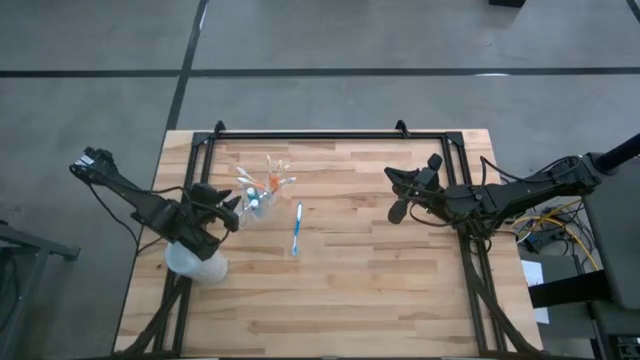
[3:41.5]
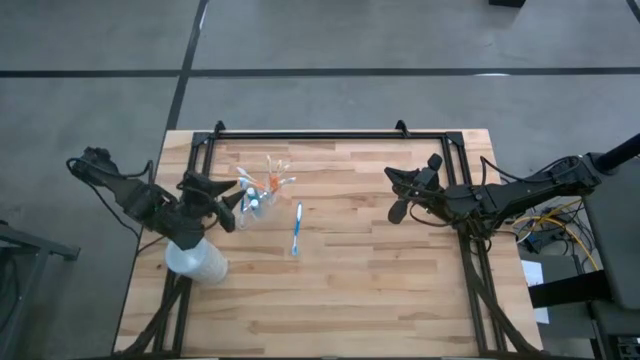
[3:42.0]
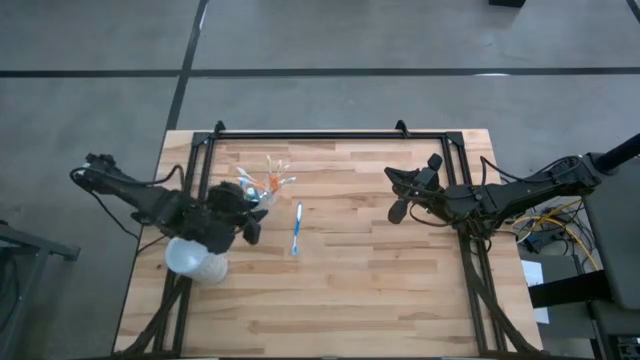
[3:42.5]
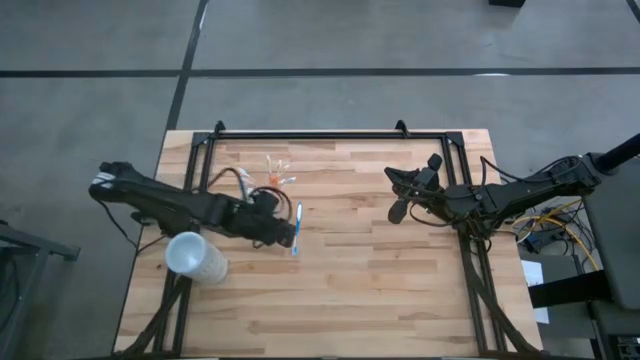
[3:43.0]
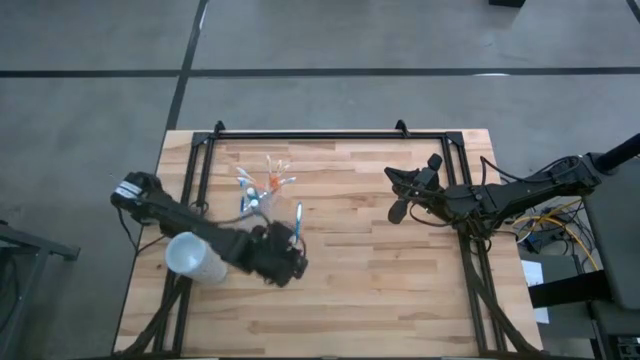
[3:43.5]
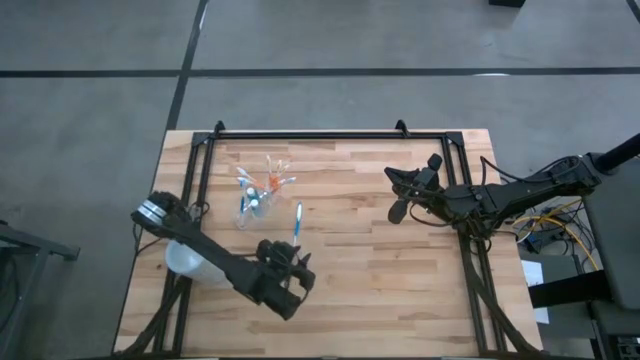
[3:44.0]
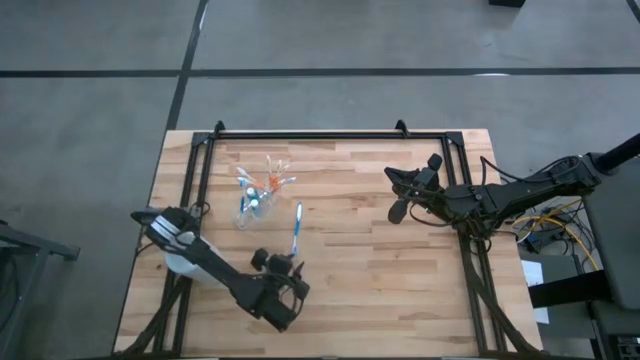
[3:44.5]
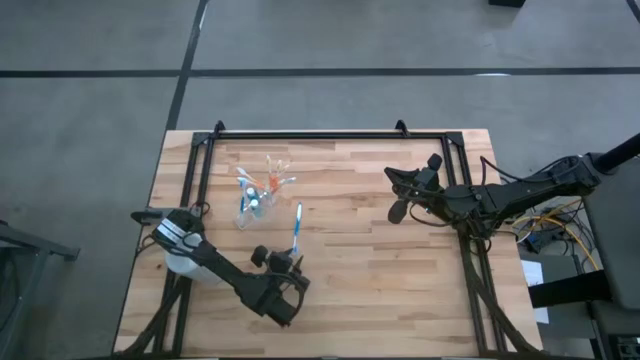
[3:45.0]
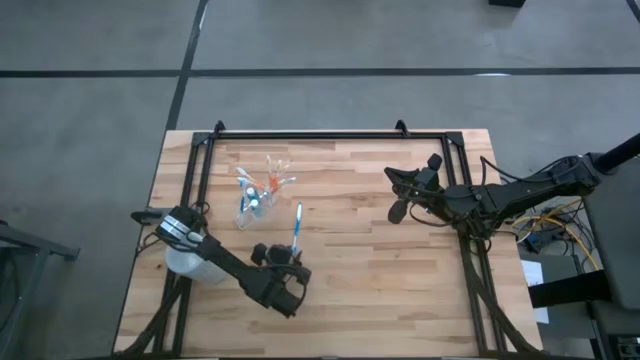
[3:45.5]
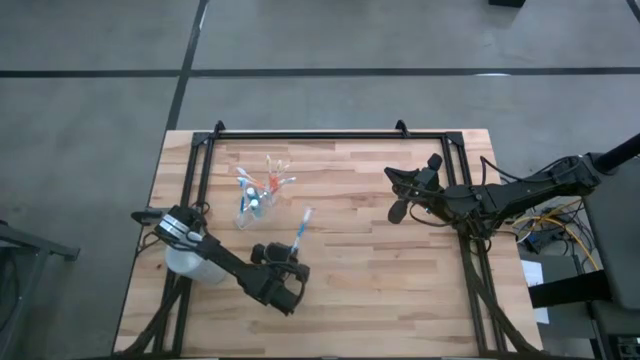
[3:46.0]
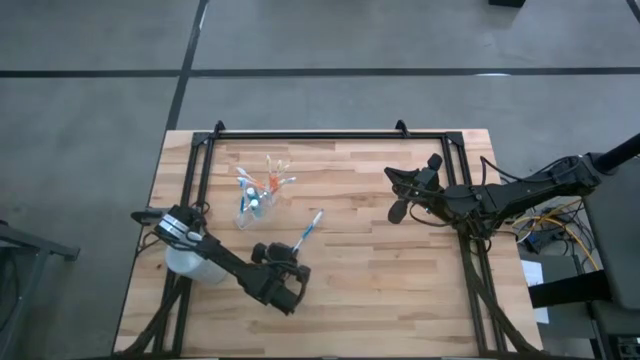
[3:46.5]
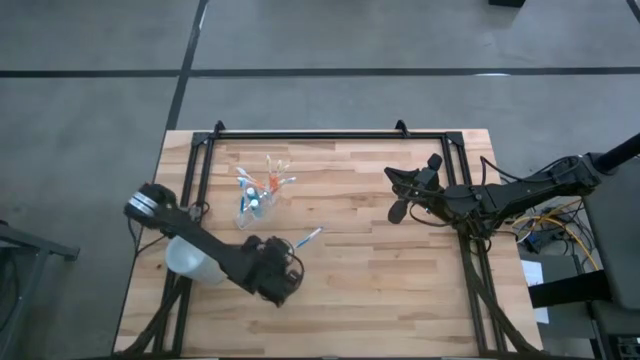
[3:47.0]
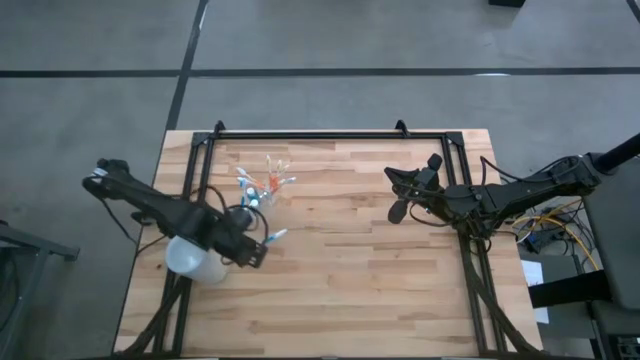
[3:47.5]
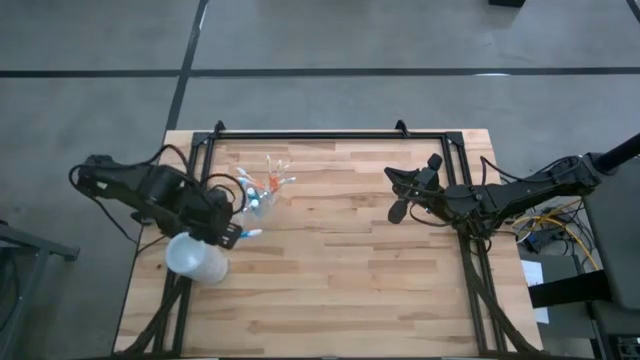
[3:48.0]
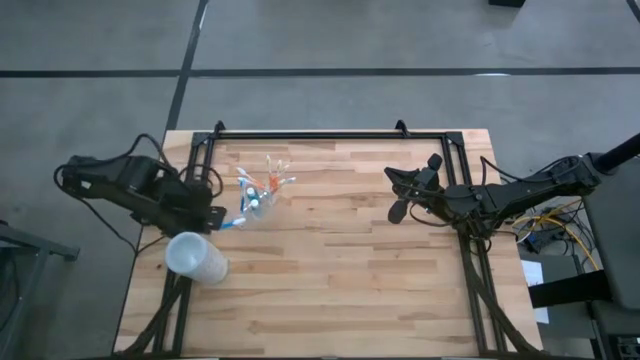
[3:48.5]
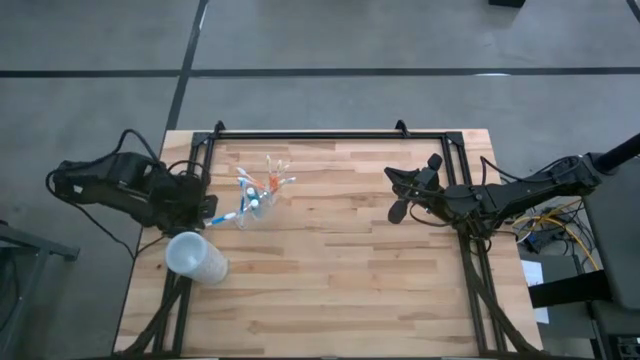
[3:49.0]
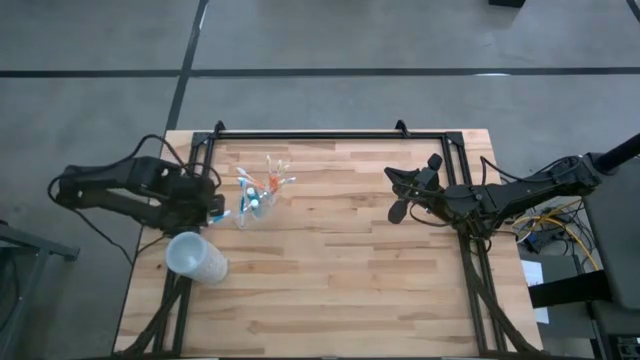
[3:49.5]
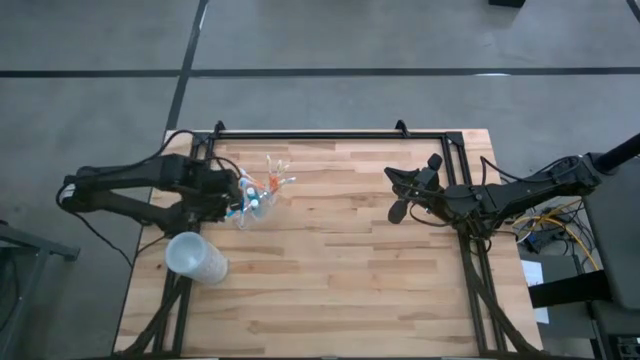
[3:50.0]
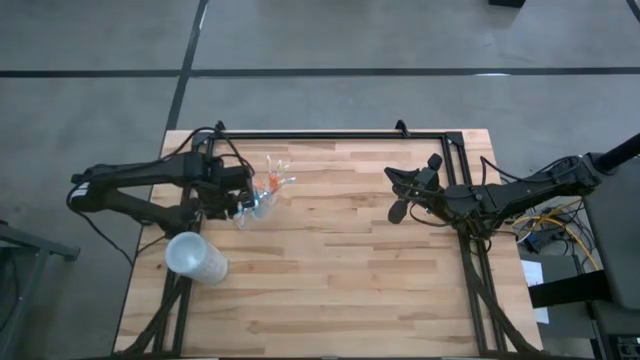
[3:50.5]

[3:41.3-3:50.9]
Task: Pick & Place toothbrushing station
Put the blue toothbrush into the transparent organizer

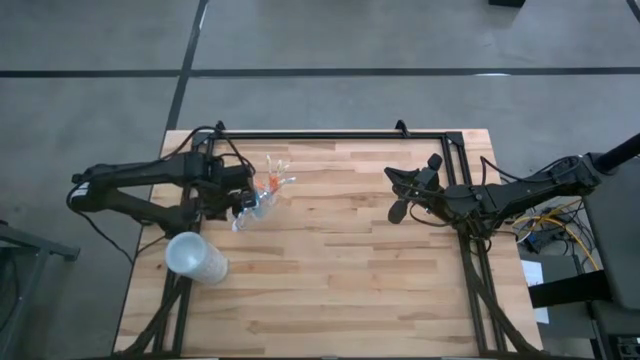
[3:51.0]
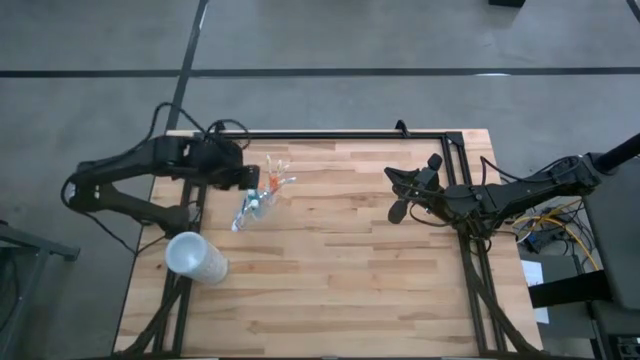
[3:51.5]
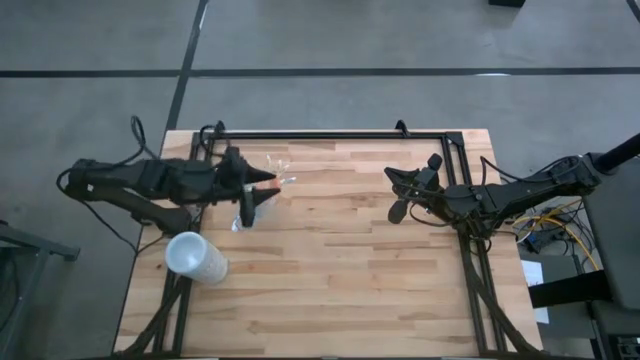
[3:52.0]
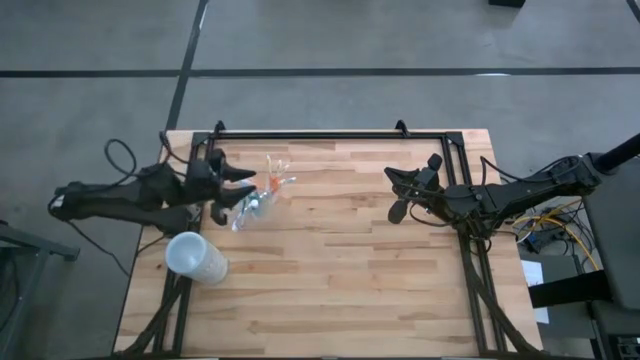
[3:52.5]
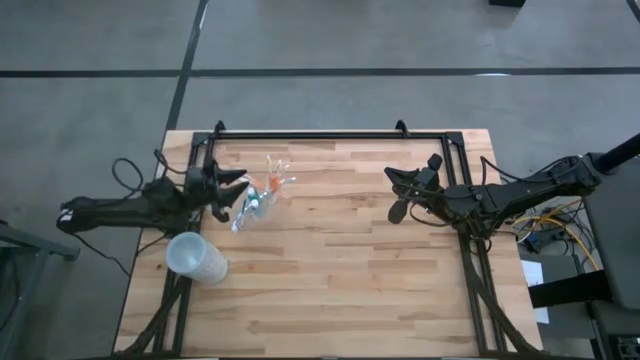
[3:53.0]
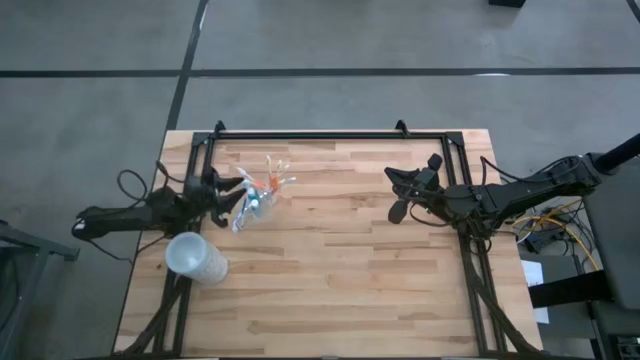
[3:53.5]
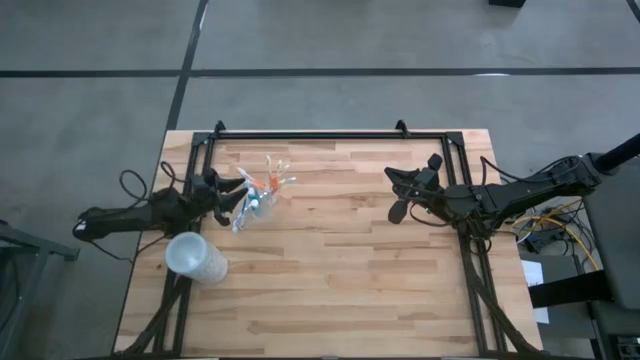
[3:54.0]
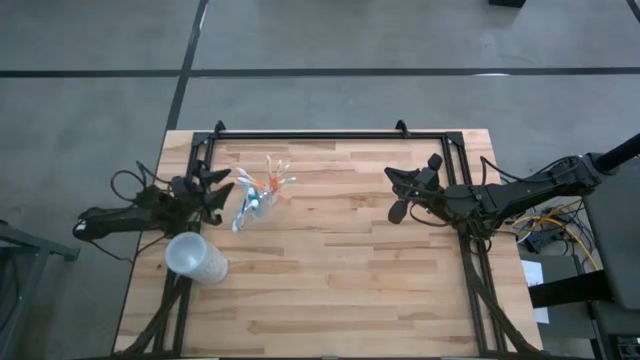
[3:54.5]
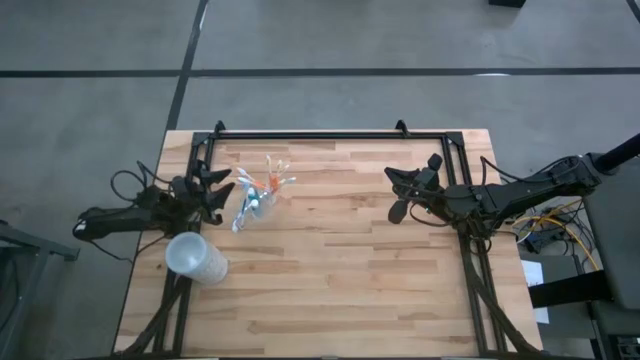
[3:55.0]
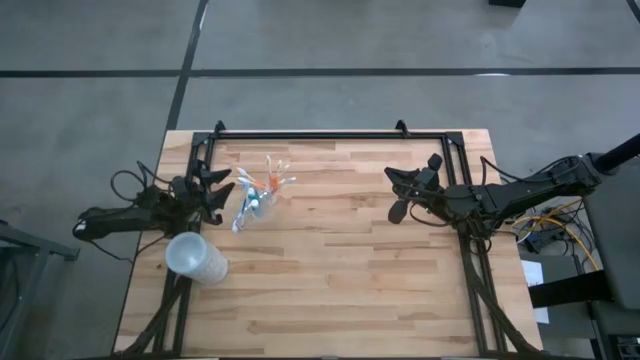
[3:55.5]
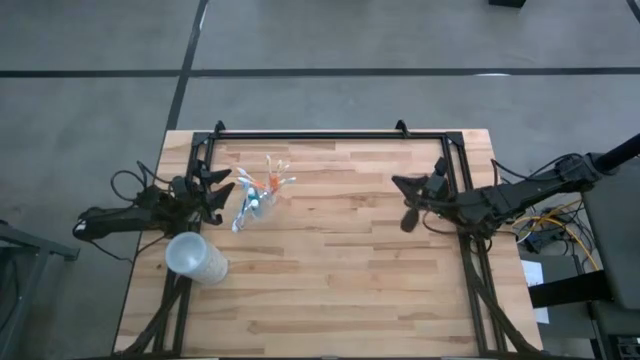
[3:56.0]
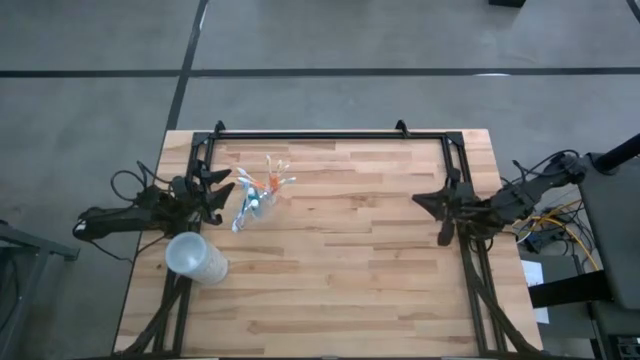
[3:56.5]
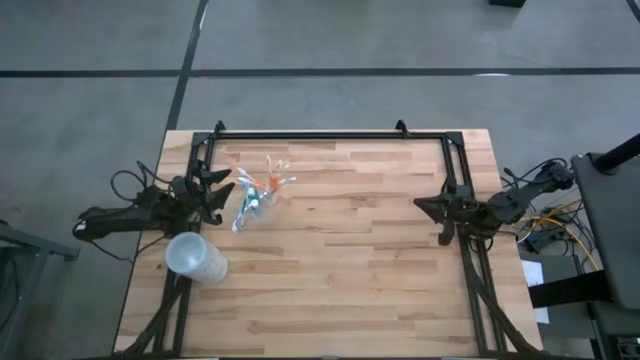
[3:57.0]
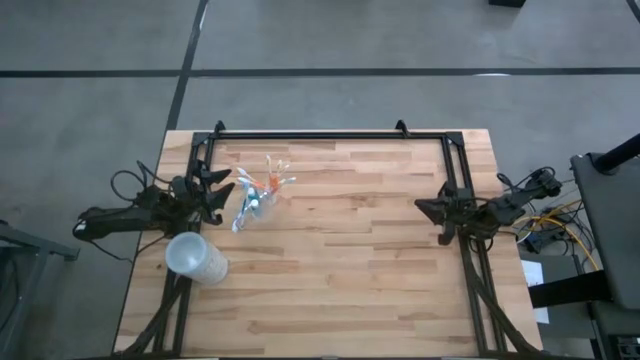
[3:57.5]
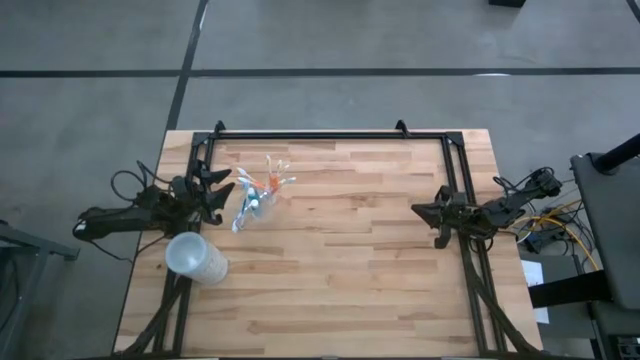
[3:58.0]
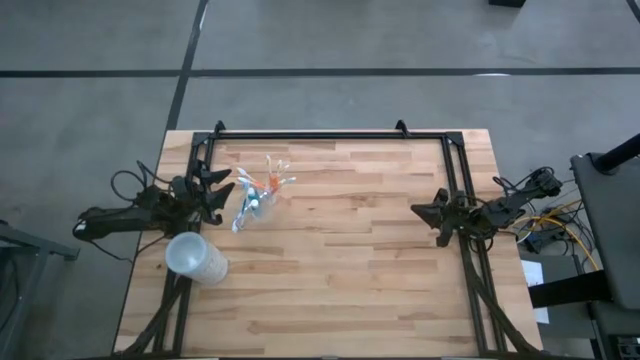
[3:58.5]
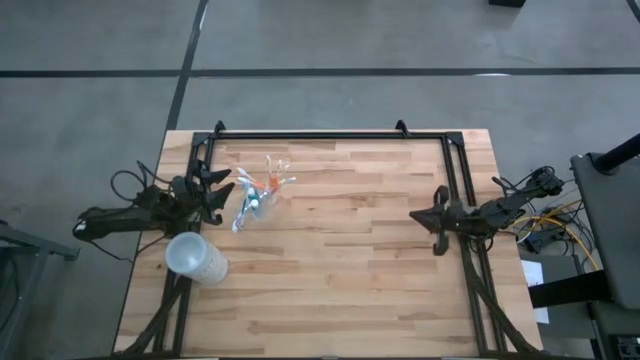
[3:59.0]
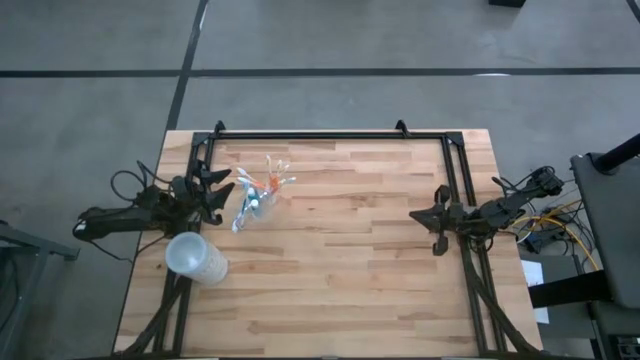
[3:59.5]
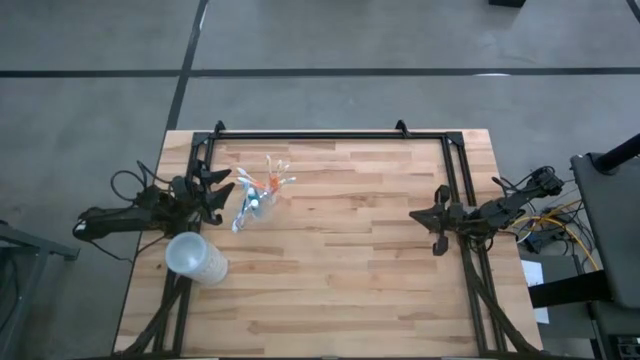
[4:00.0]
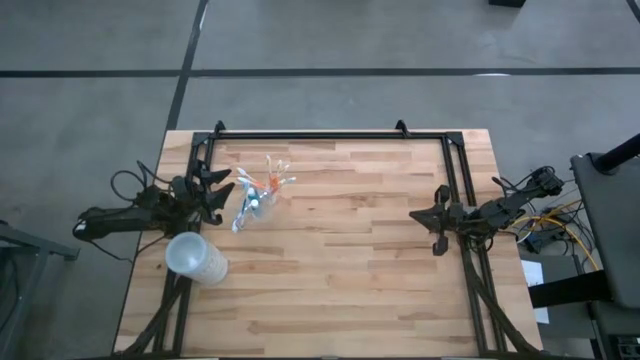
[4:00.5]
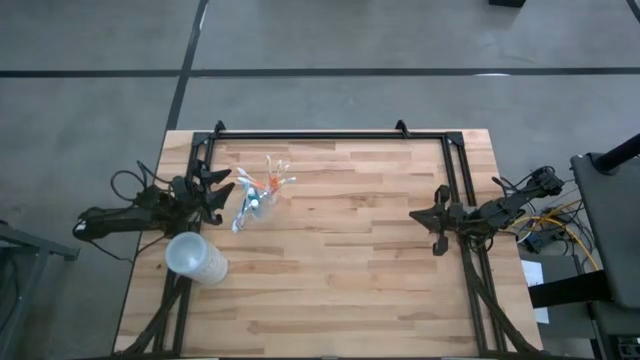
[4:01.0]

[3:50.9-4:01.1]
Return to Home Position

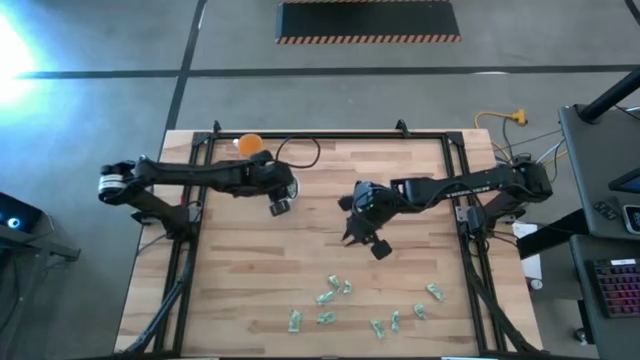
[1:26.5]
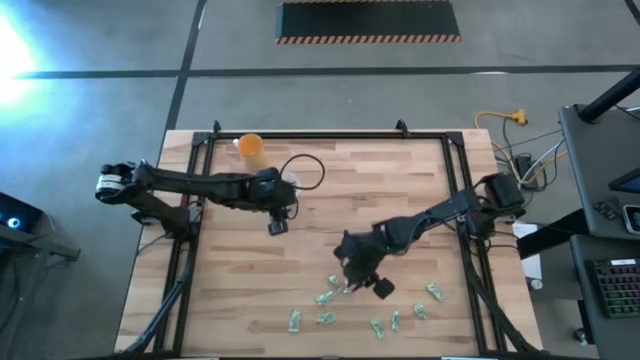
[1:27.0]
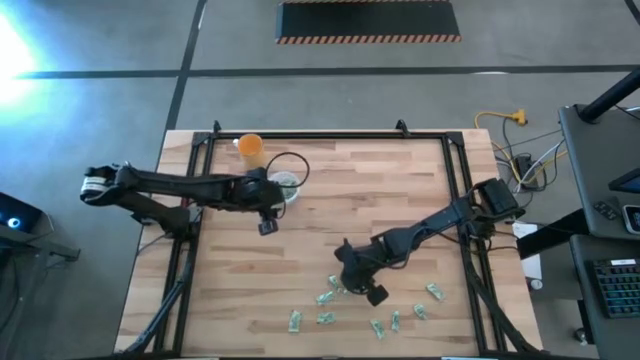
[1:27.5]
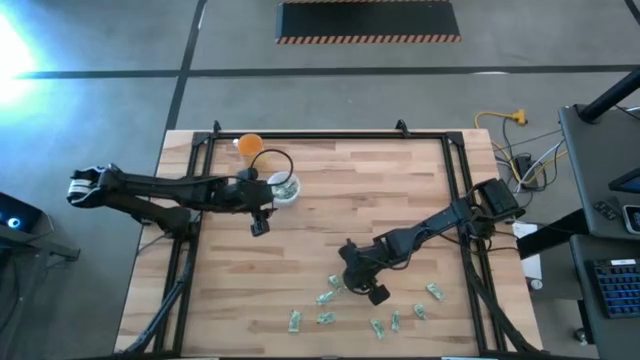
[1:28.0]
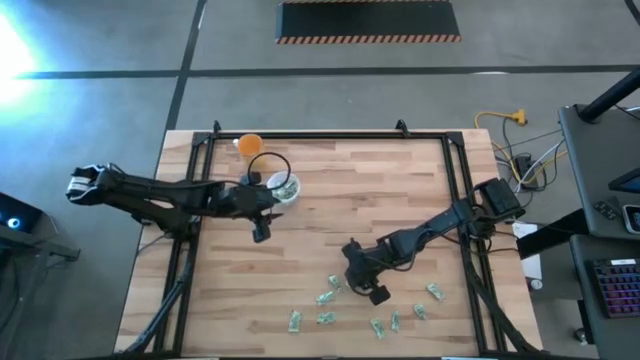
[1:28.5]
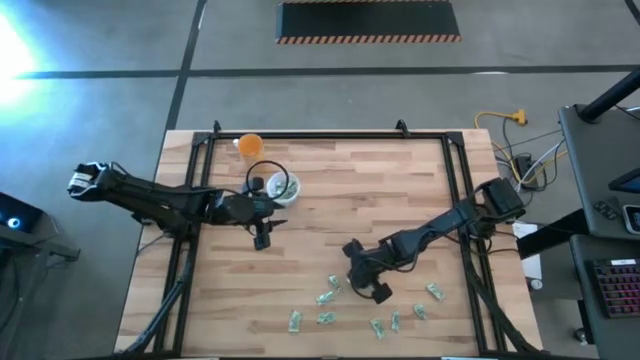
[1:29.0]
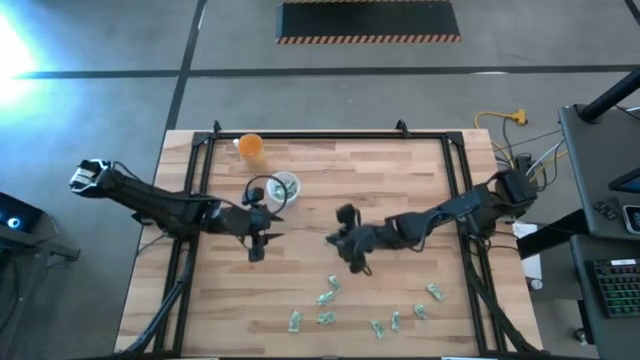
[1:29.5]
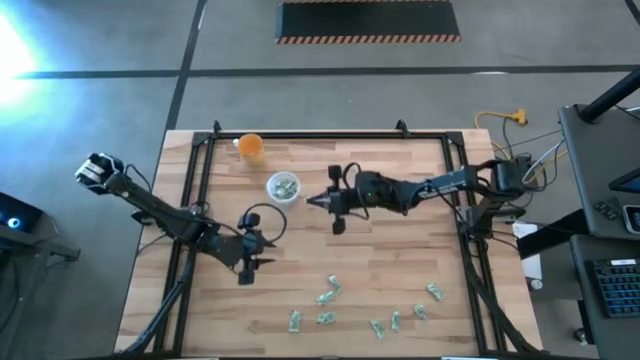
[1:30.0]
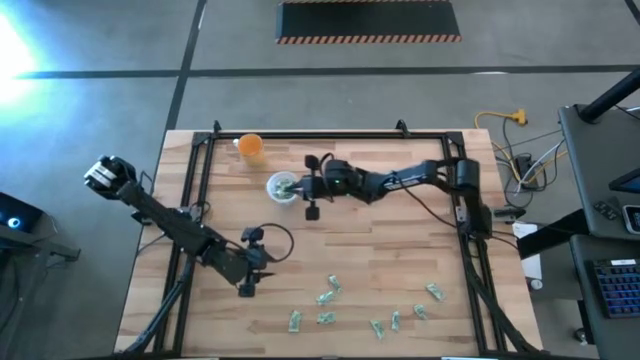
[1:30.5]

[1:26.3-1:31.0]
Task: Pick and place Stevia / Truvia into bins
Put the stevia packet into the transparent container
